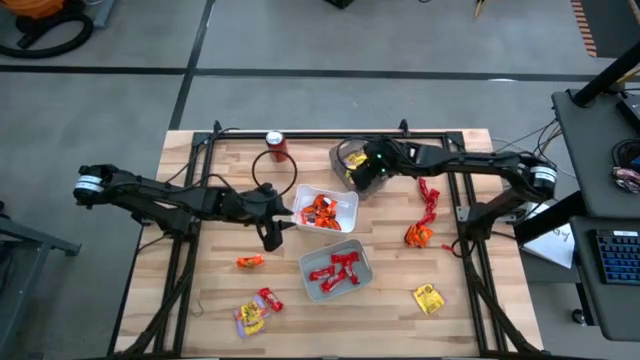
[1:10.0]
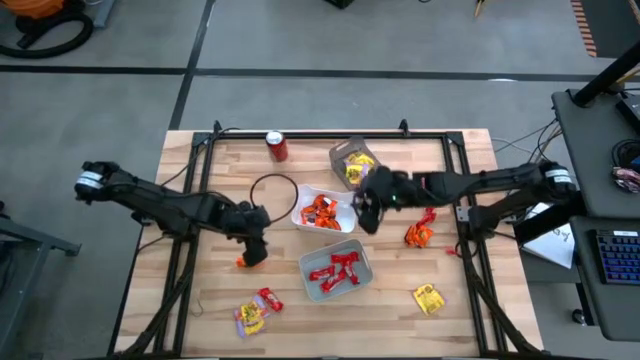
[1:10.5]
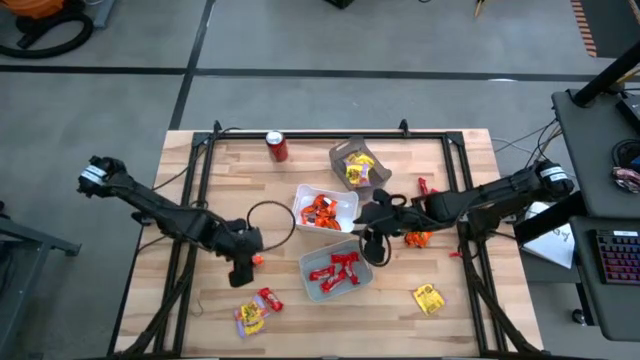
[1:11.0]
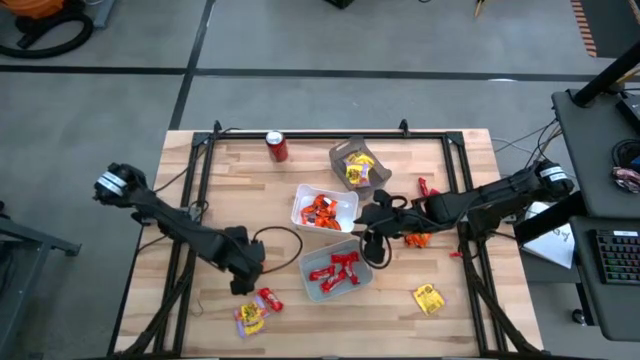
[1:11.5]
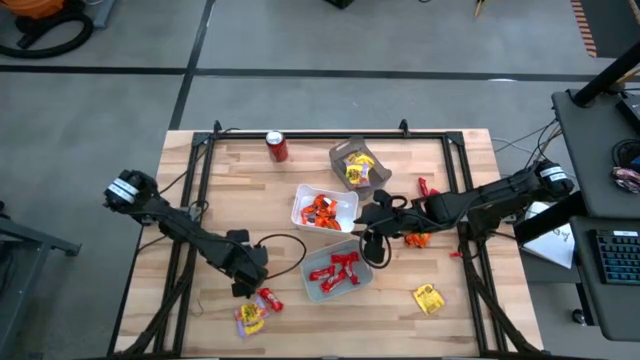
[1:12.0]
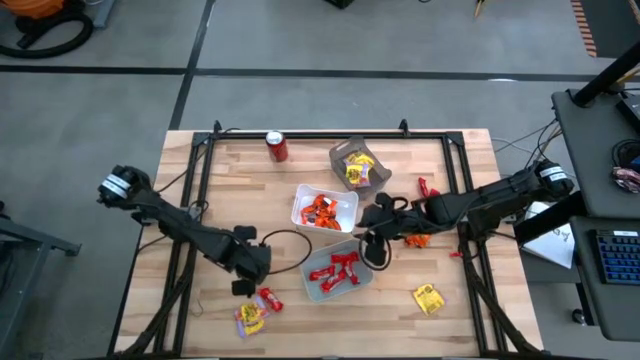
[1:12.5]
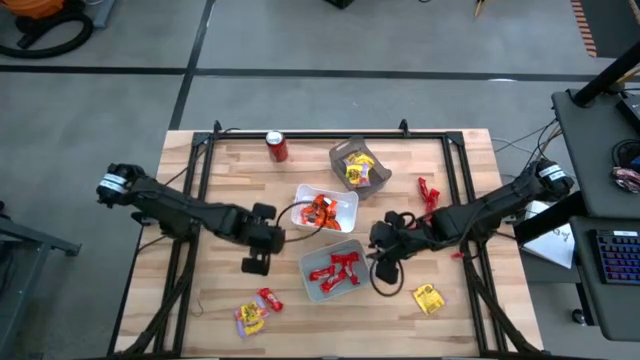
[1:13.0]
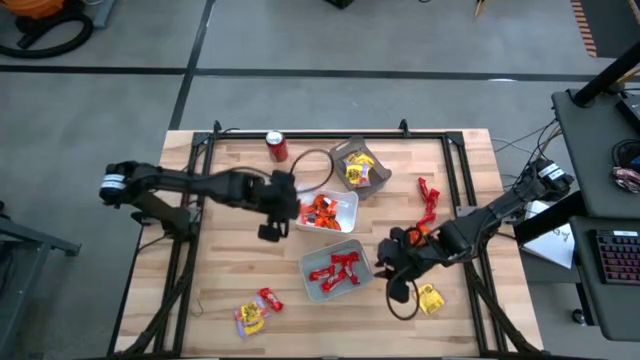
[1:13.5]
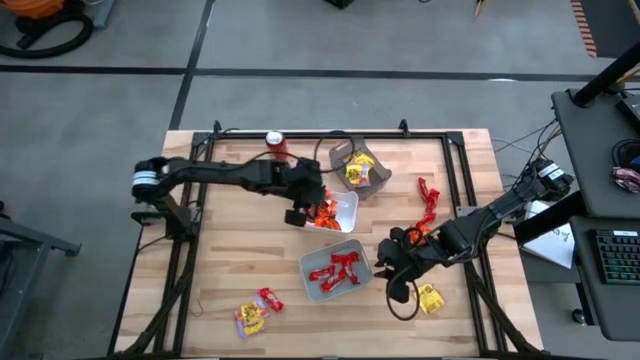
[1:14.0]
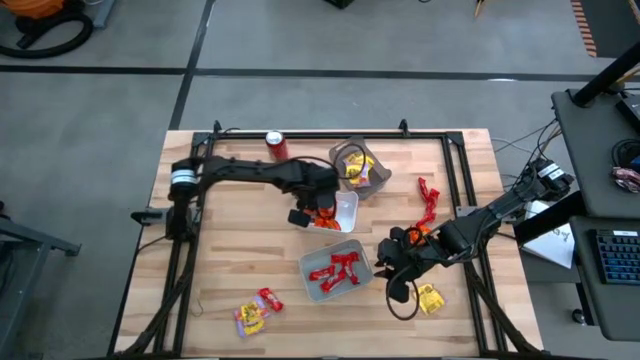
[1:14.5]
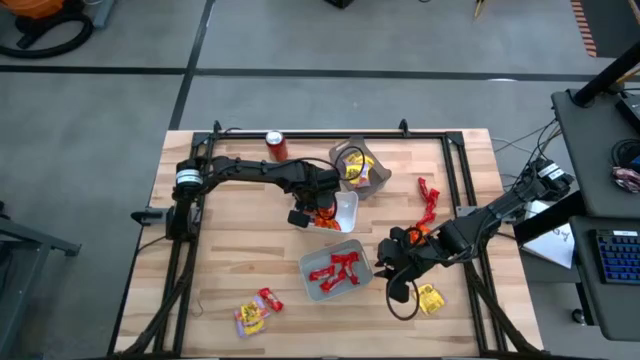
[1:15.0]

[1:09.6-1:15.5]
Task: Sort candy
Put the orange chocolate pack into the white bin

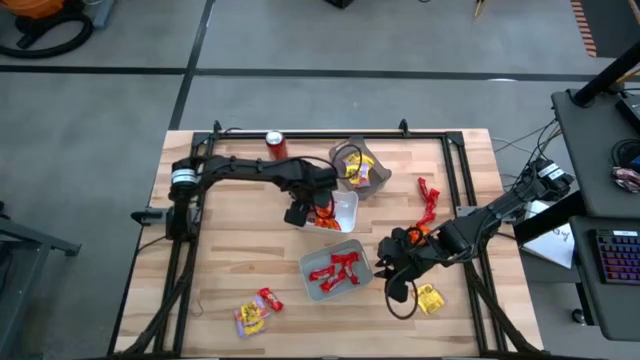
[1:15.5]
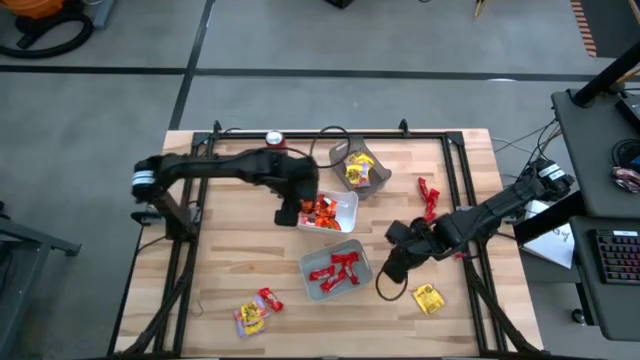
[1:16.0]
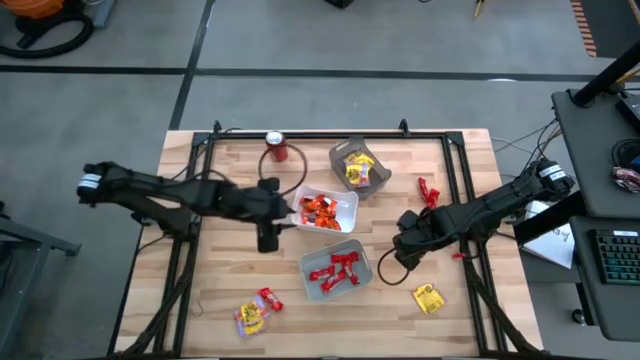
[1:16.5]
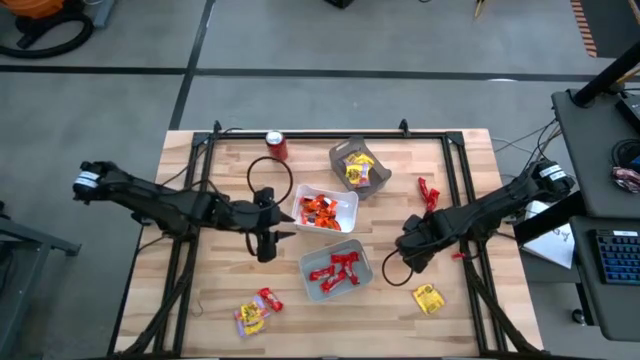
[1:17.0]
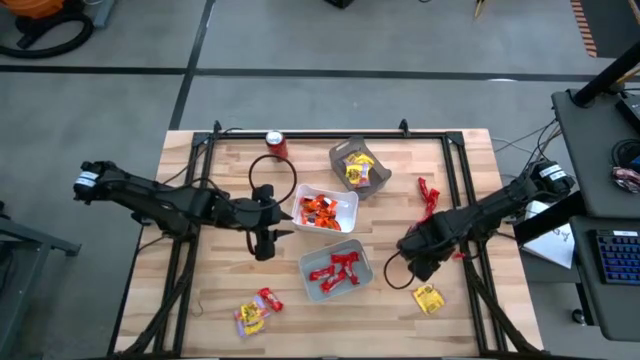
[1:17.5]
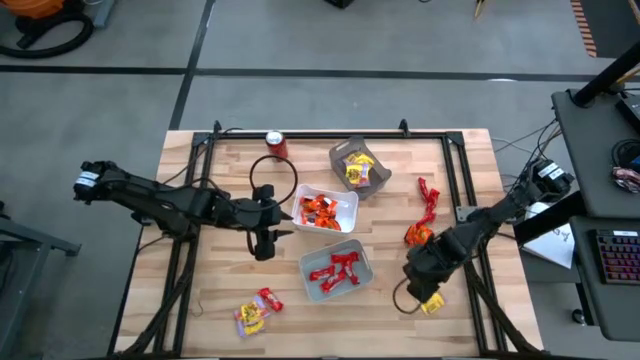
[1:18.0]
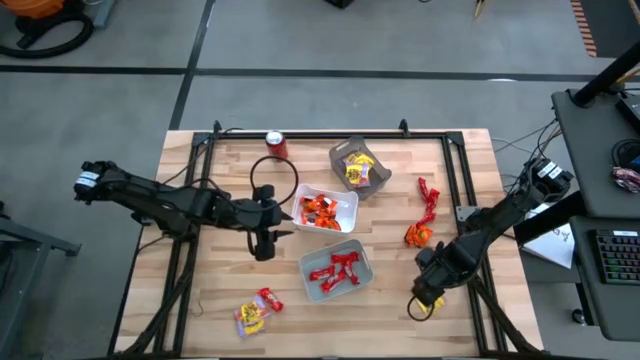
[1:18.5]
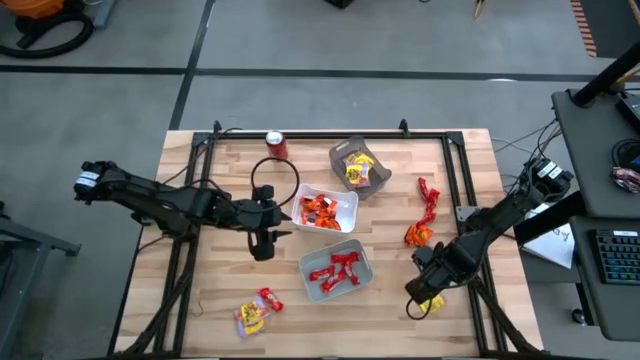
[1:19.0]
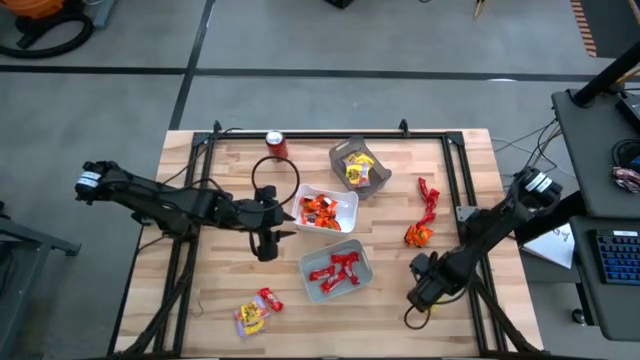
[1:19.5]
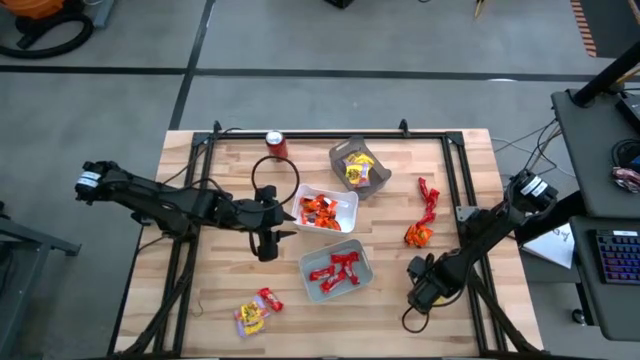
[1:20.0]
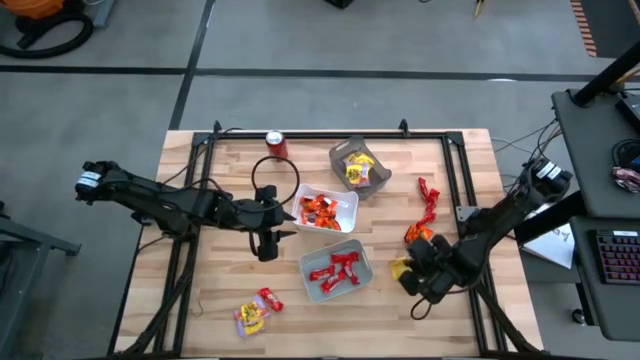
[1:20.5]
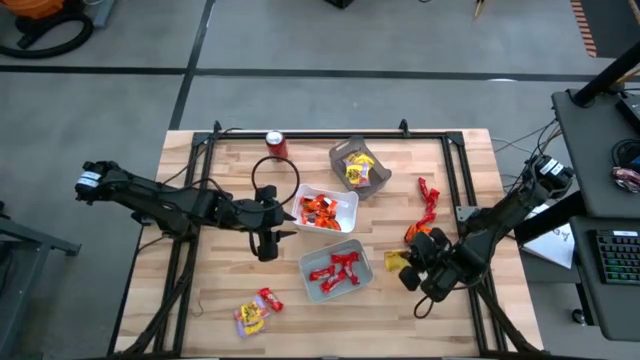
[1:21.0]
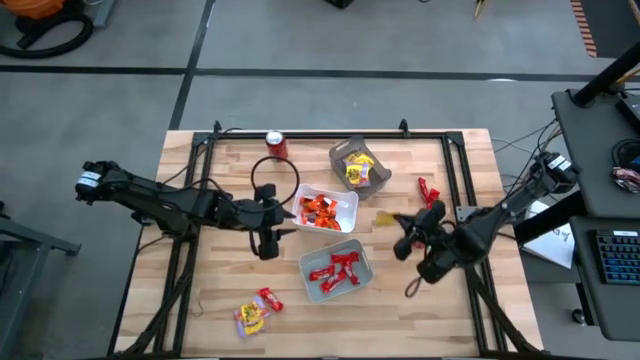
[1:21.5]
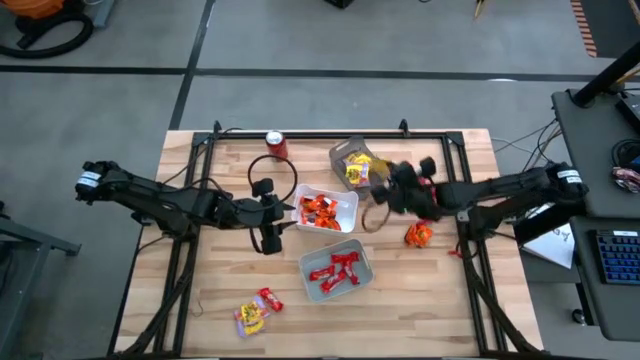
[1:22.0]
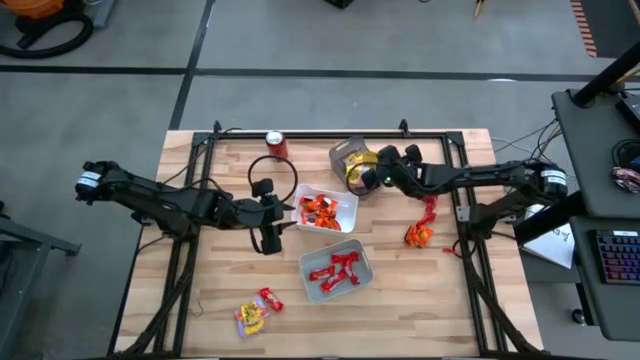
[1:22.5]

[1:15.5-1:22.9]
Put the yellow candy pack into the black bin

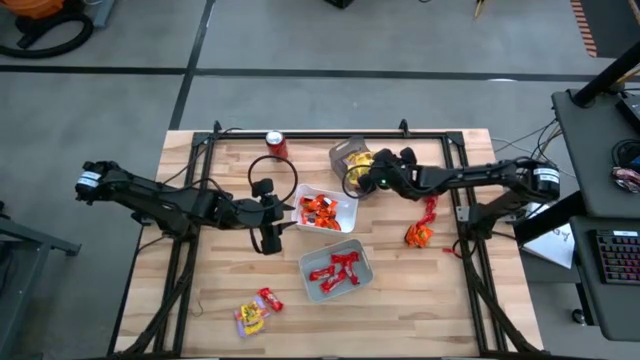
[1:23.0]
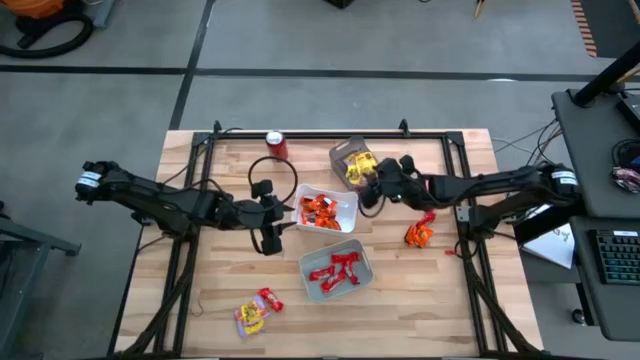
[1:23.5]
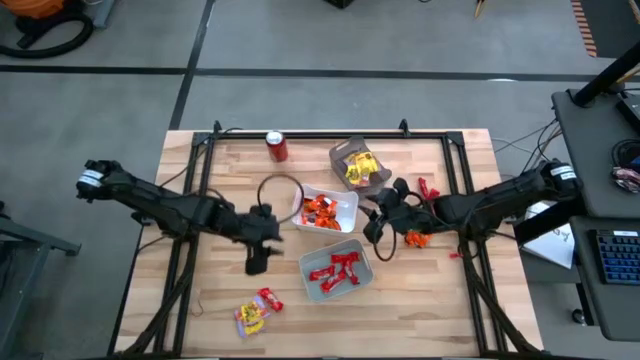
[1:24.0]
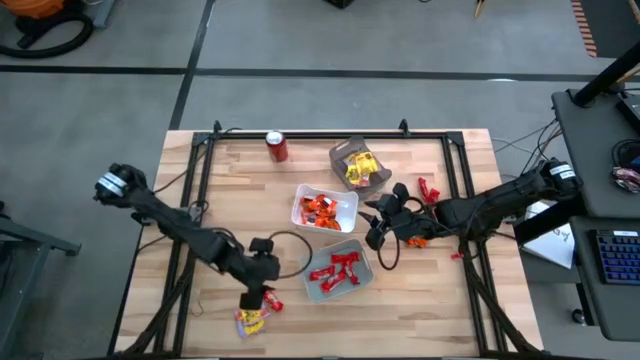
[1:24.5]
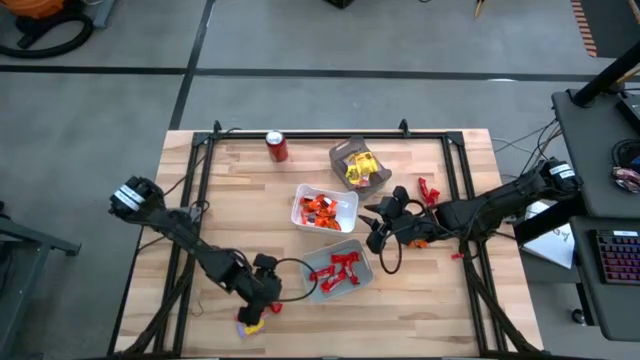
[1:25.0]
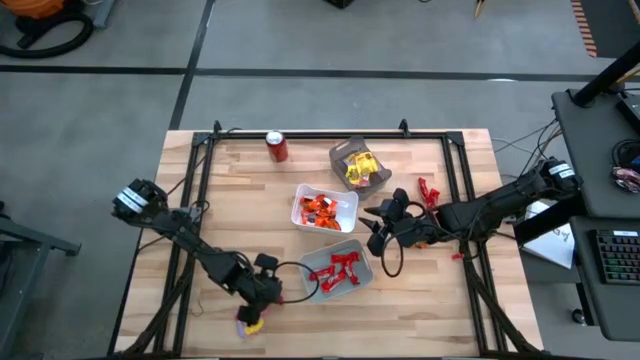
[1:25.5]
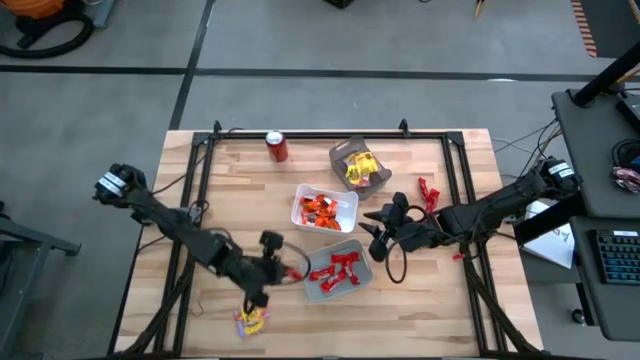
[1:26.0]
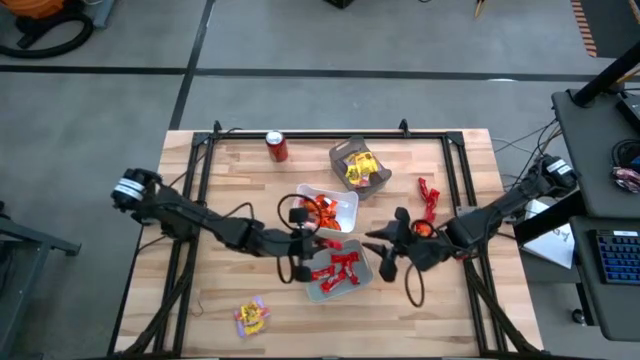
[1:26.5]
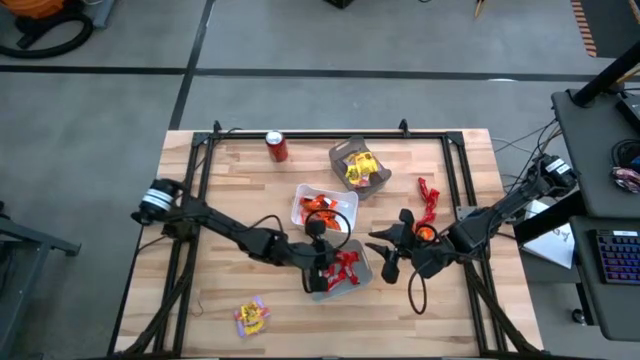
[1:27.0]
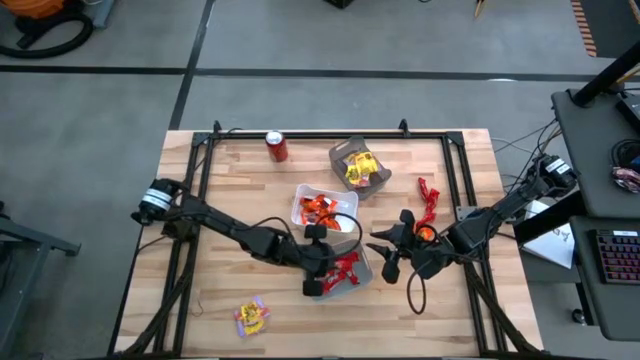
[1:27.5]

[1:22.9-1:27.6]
Put the red chocolate pack into the gray bin

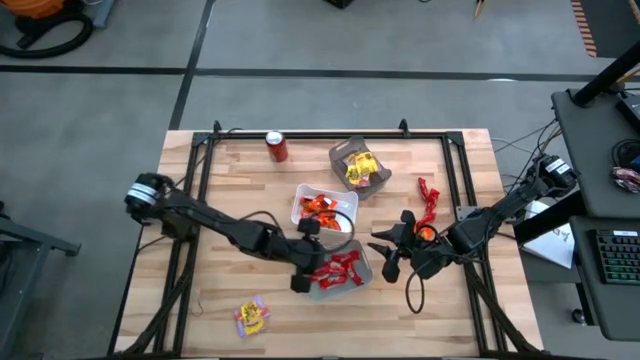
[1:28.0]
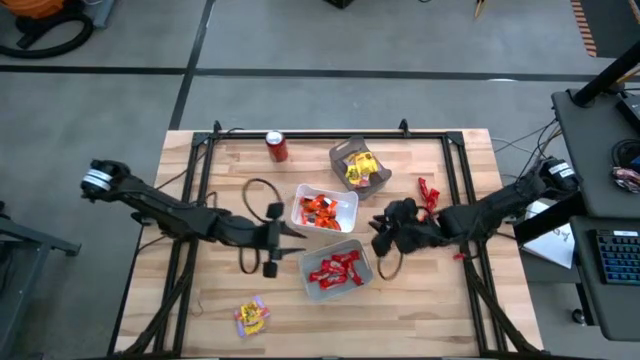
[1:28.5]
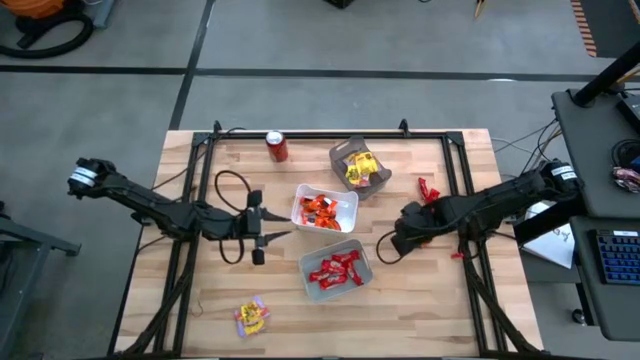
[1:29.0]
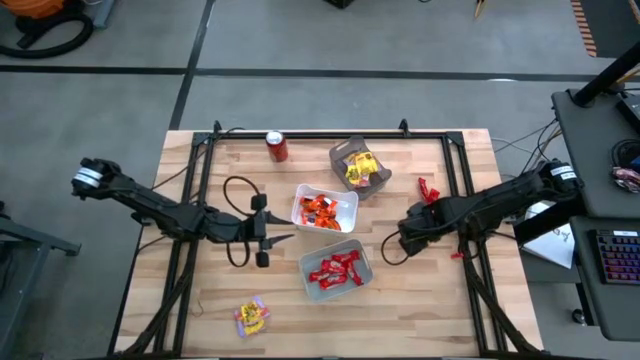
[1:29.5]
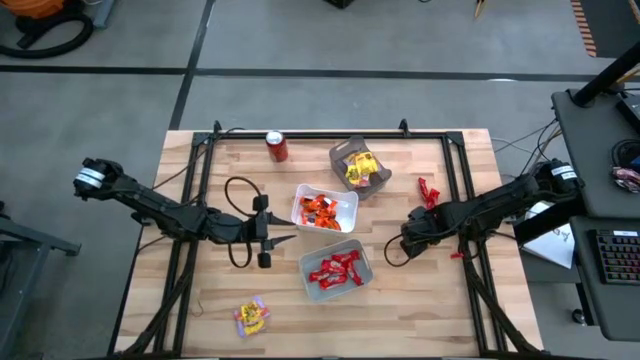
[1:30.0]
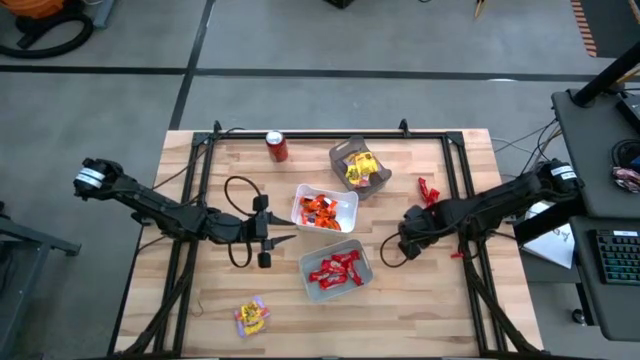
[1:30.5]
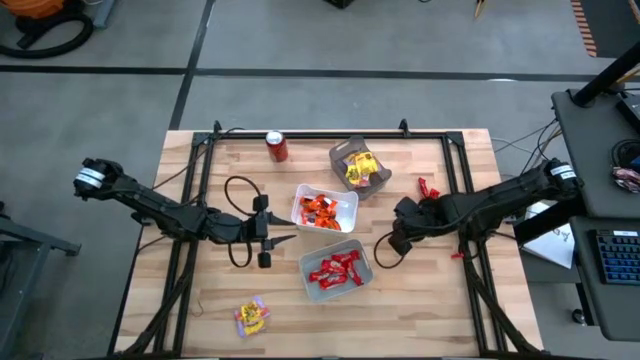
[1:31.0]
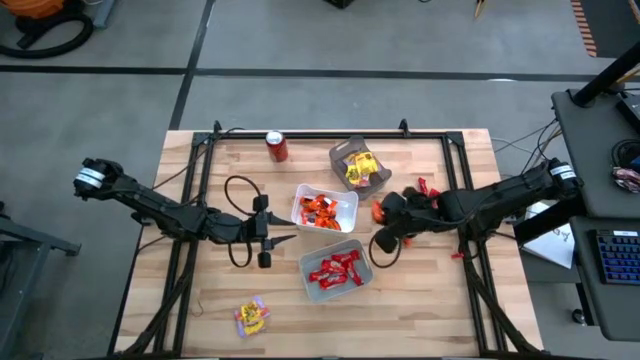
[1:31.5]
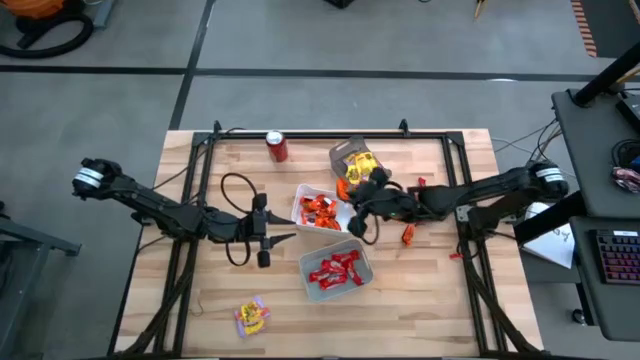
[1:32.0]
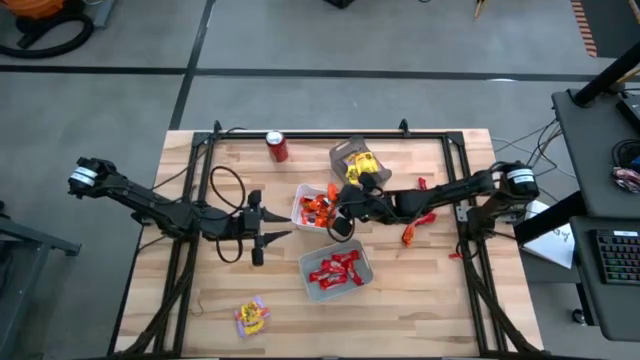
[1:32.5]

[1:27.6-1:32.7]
Put the orange chocolate pack into the white bin
